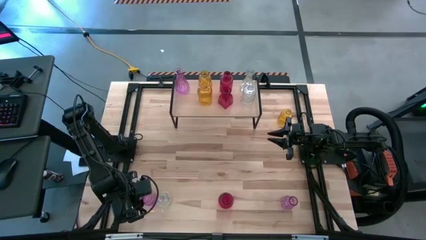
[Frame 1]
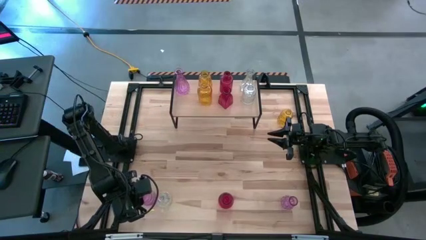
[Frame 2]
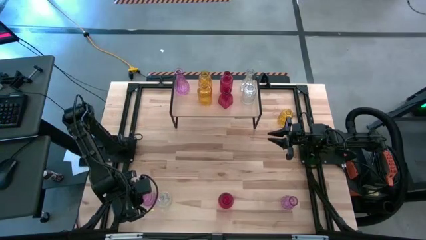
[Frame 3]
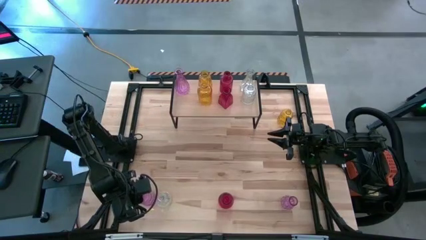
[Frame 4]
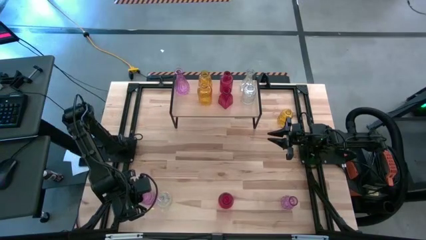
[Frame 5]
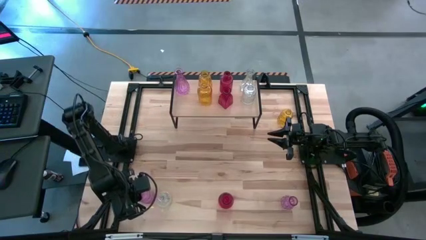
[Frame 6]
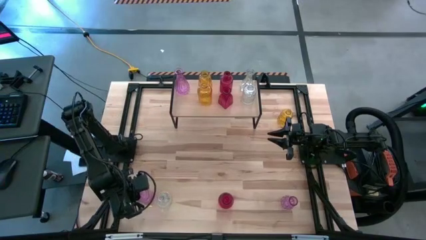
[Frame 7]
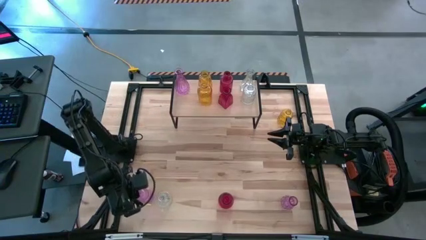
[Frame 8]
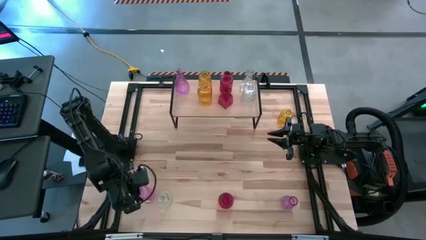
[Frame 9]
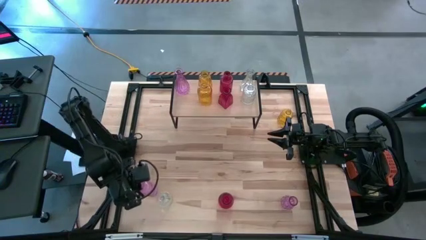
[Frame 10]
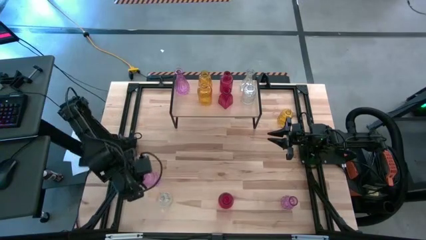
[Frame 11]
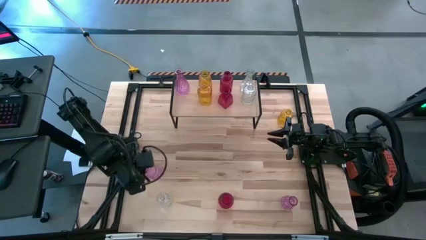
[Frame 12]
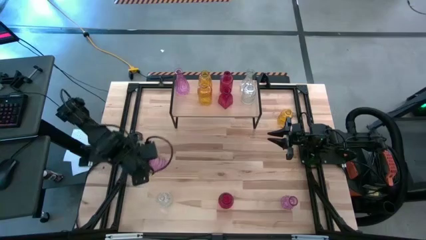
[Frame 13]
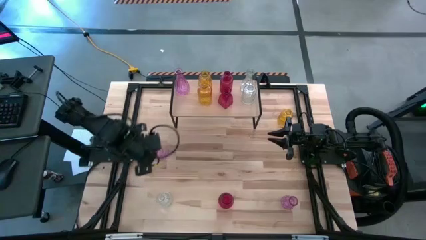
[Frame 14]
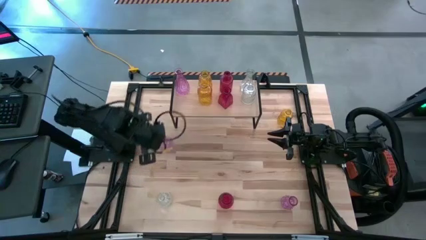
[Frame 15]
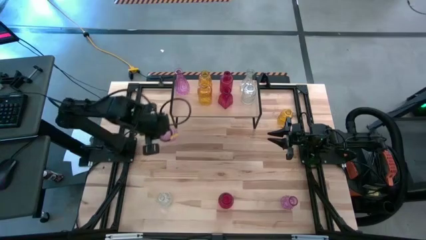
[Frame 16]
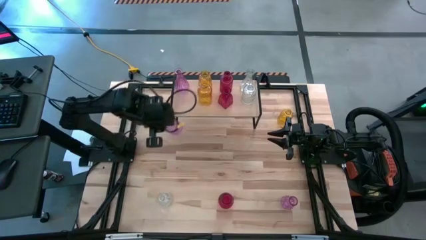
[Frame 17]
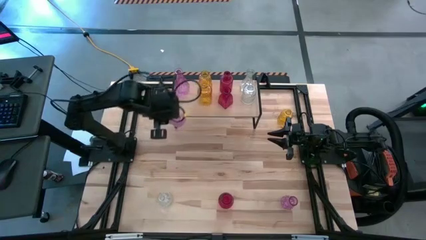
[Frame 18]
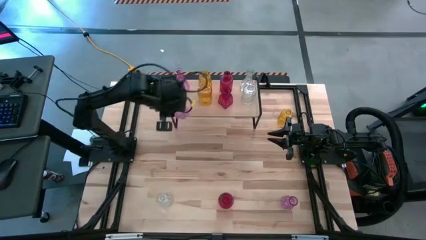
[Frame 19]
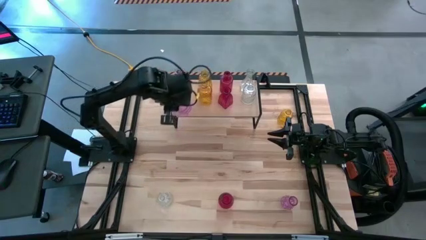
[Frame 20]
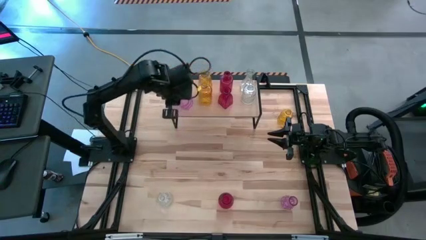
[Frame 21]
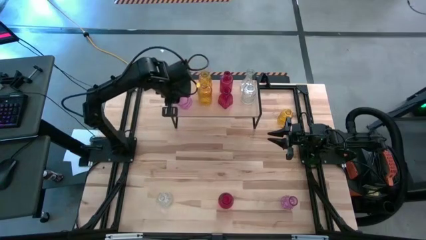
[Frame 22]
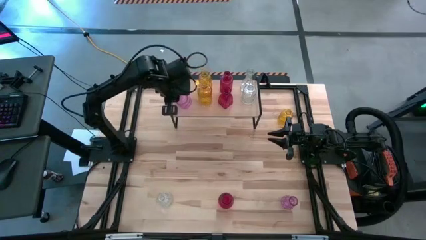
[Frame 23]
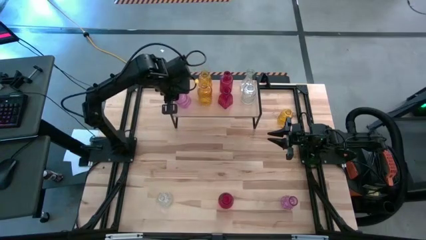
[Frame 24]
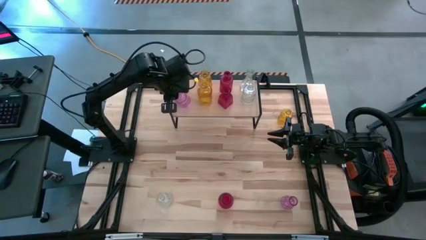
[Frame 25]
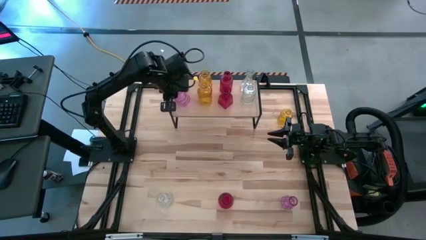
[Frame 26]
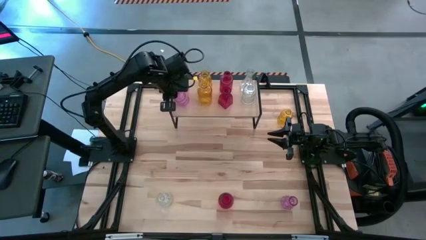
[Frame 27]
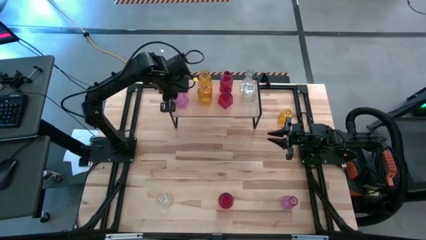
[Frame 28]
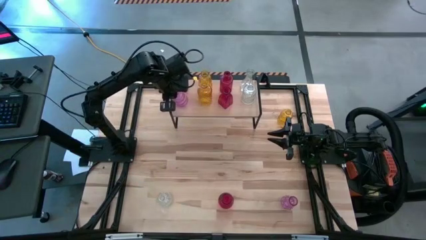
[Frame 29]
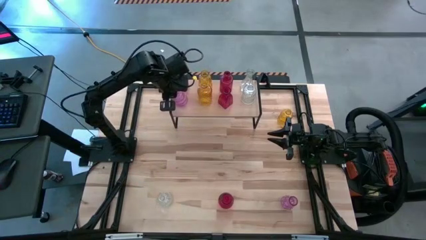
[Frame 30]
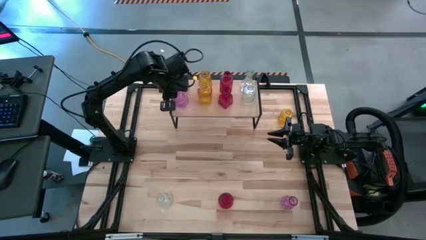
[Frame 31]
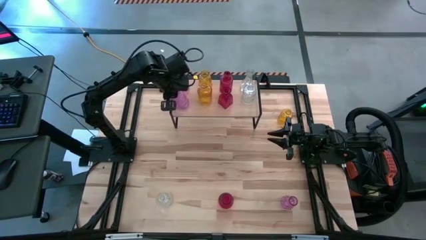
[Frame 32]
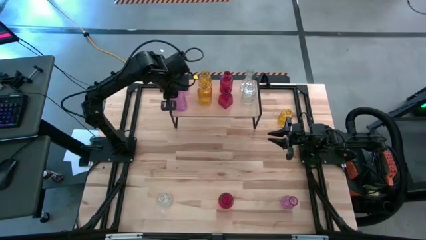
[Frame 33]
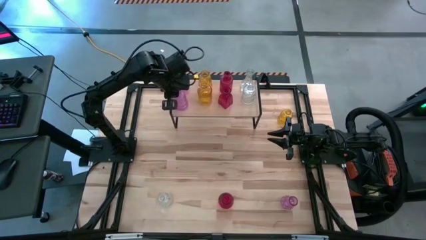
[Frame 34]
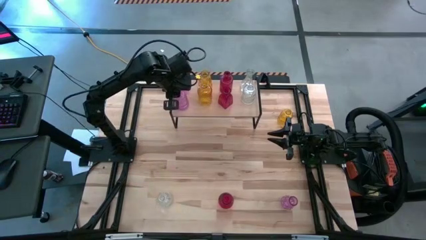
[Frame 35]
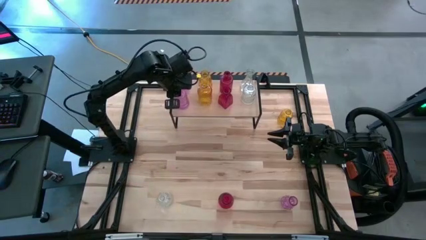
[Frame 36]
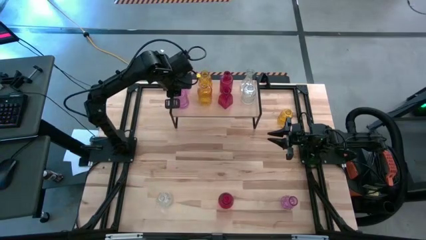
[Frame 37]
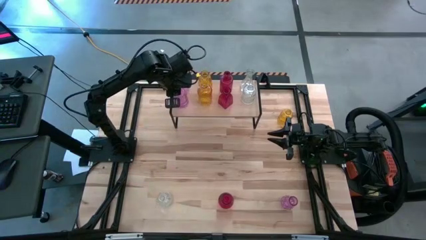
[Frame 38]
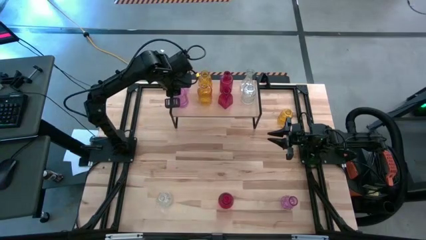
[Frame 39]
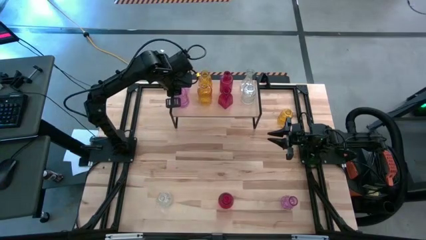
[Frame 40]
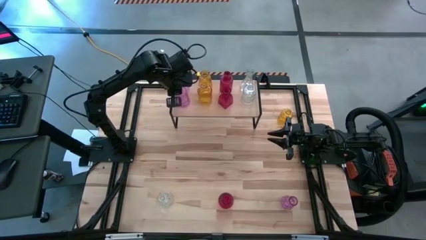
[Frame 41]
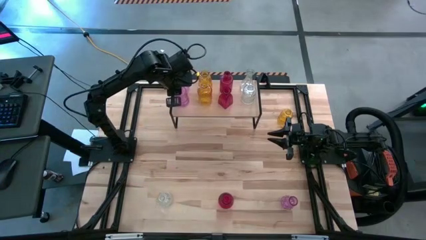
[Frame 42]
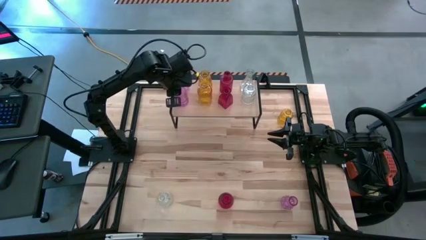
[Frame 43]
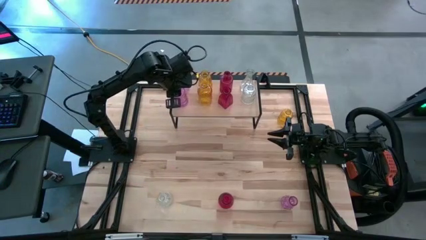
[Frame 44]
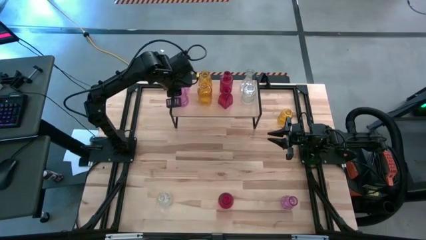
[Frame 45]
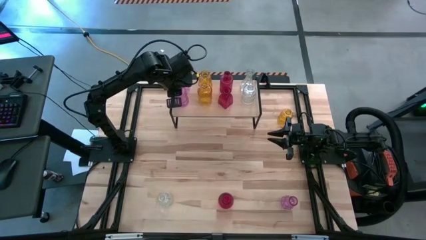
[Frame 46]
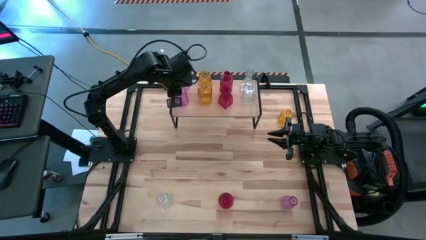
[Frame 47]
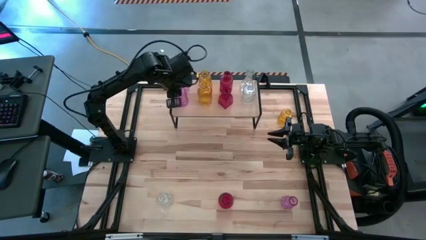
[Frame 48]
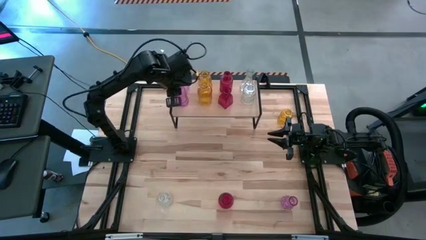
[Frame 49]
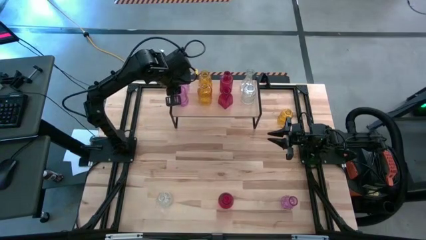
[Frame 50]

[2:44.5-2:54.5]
Task: sort vases onto shelf
Put the left purple vase on the shelf and align it with the other purple vase

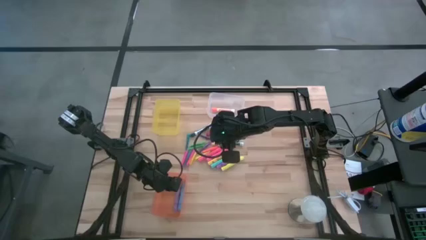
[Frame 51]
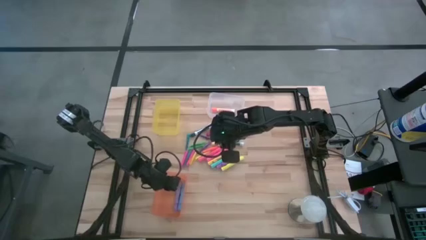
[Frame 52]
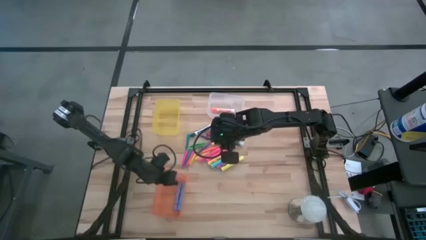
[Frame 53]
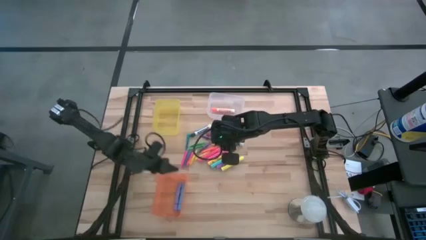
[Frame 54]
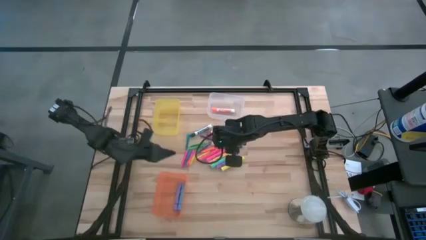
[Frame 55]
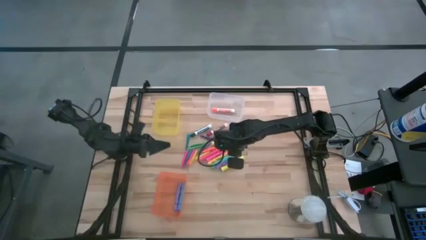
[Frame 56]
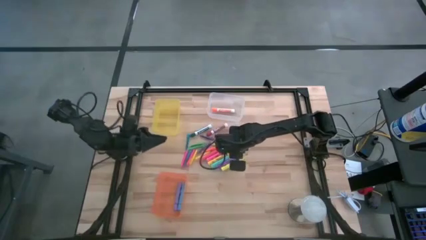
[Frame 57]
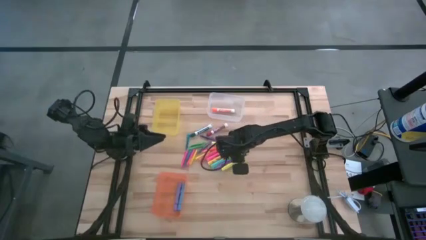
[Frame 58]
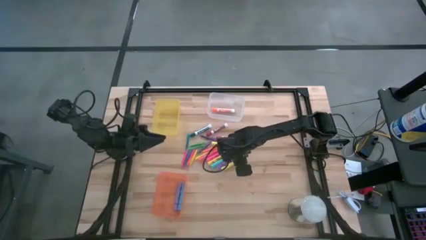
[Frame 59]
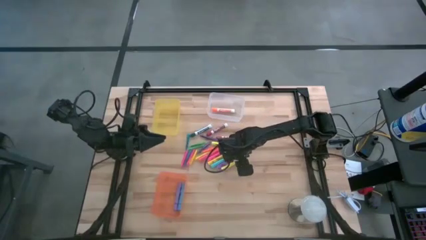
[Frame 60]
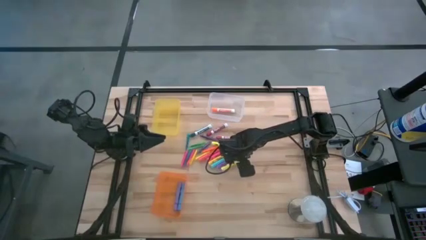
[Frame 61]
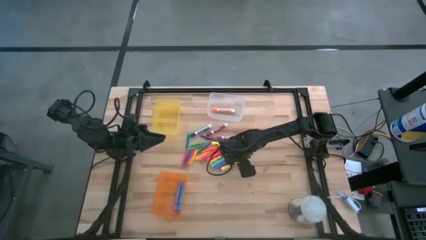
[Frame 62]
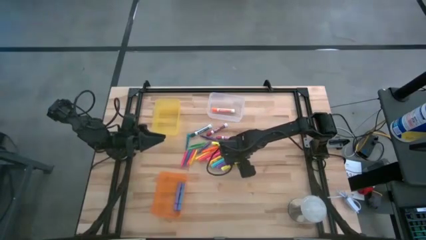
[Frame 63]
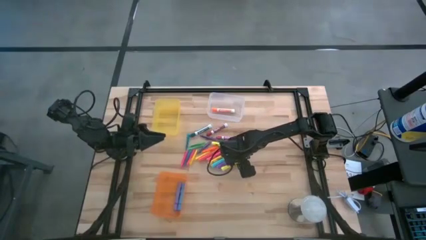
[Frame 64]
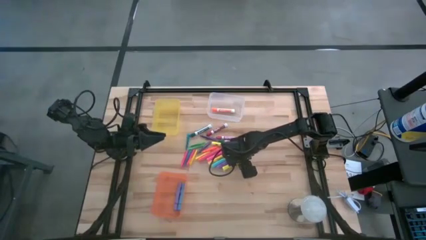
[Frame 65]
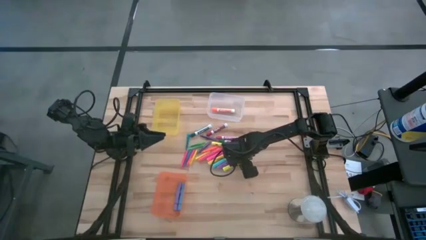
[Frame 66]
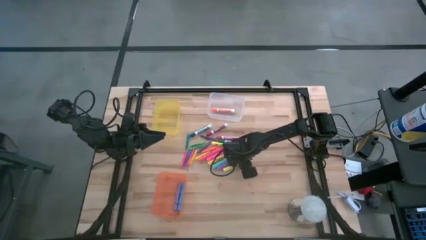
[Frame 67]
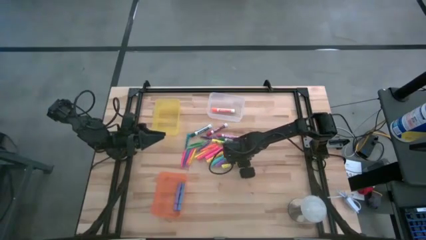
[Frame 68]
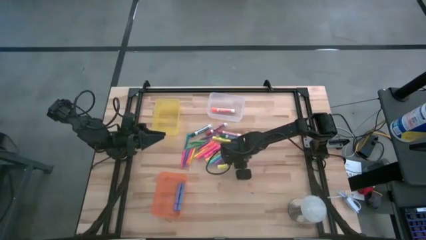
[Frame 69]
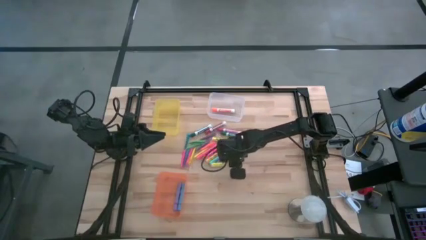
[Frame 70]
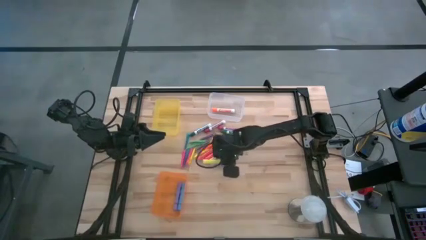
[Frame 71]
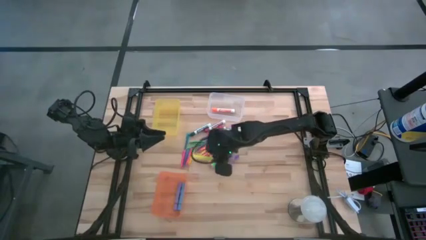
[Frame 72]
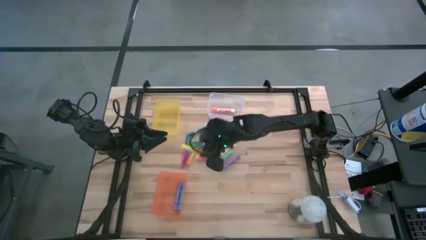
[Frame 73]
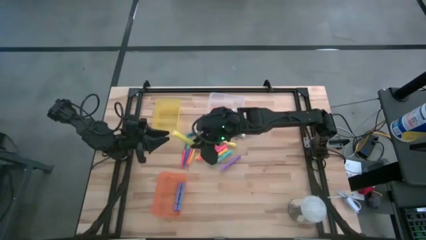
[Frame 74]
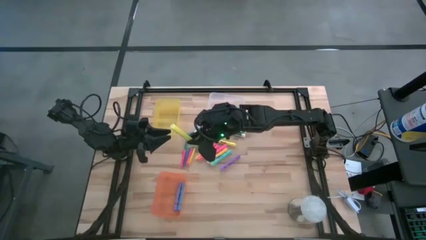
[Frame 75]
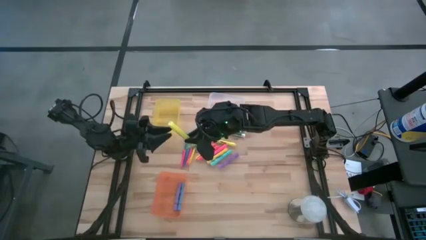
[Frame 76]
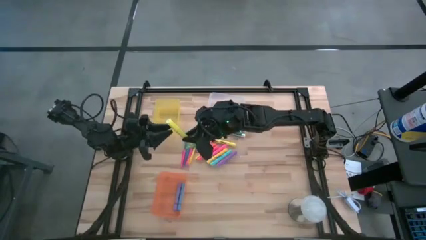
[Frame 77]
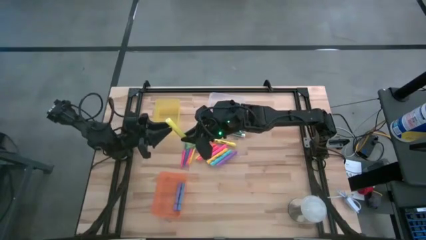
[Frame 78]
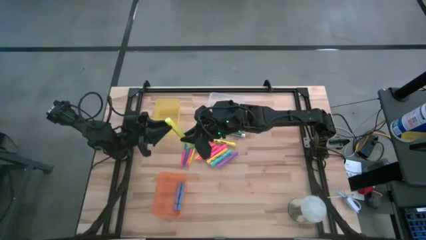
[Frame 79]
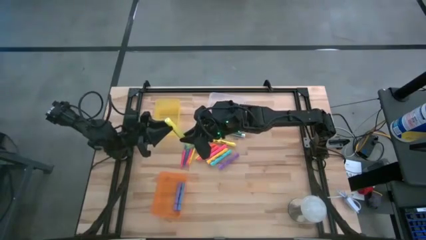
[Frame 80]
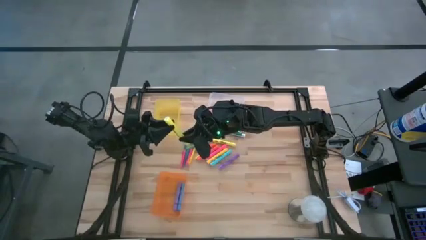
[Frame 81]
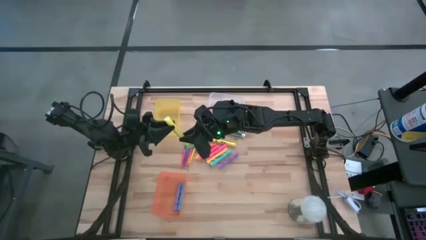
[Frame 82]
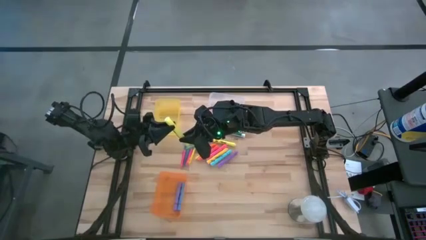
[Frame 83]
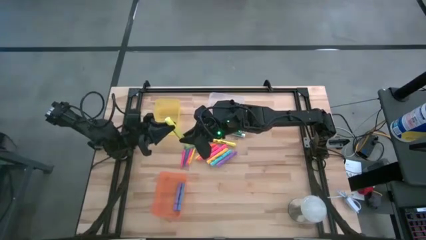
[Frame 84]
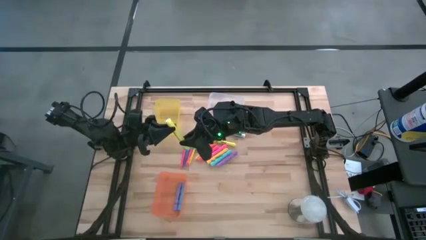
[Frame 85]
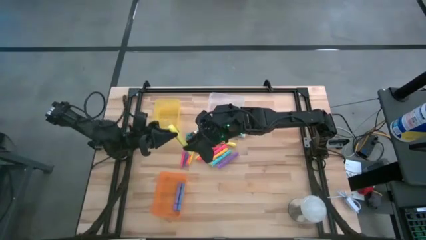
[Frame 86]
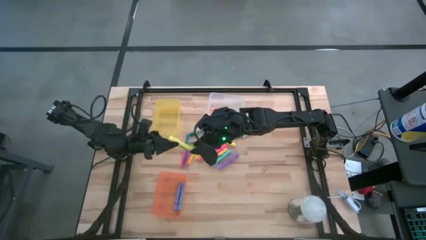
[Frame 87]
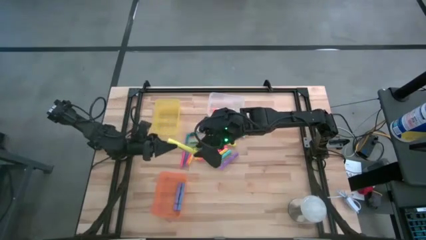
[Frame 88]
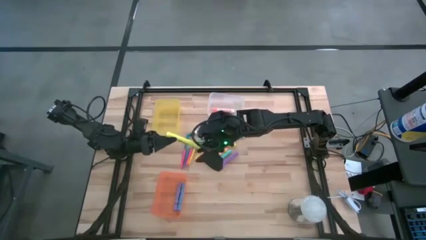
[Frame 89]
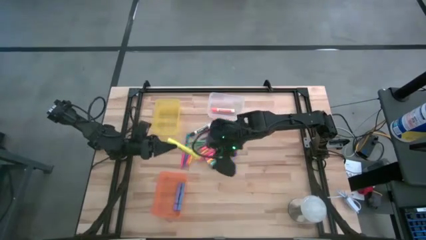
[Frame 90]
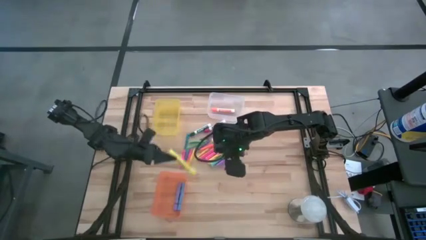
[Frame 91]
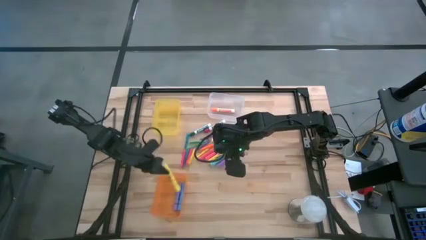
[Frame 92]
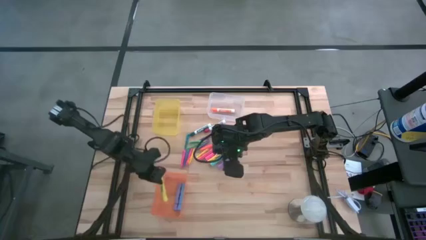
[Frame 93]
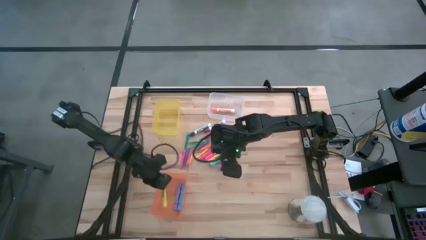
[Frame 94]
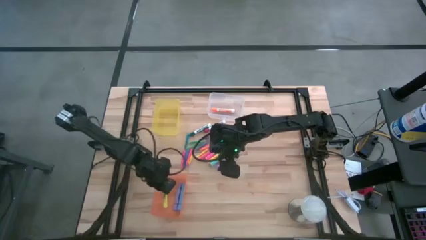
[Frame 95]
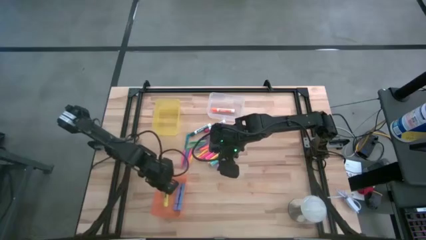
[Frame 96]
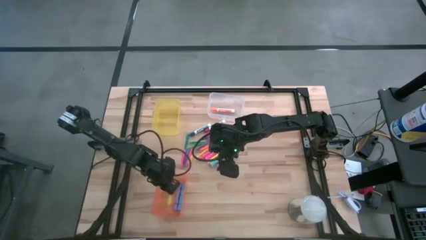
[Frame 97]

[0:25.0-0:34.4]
Task: Pick & Place Markers
Put the bottom yellow highlighter into the orange bin
